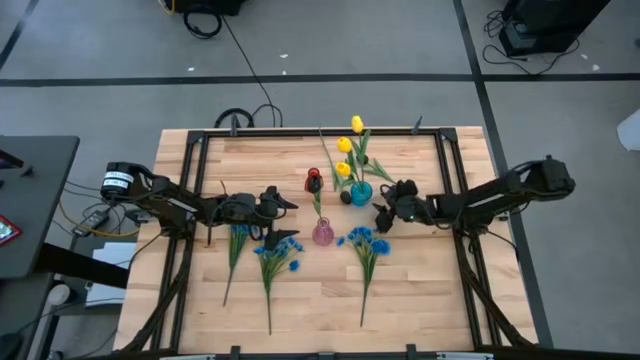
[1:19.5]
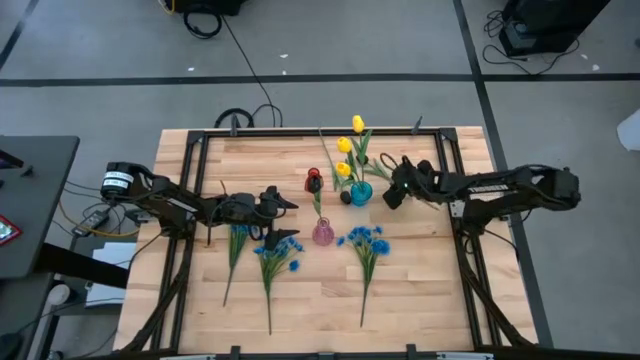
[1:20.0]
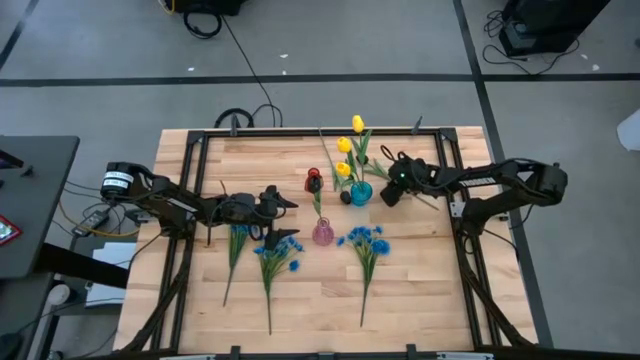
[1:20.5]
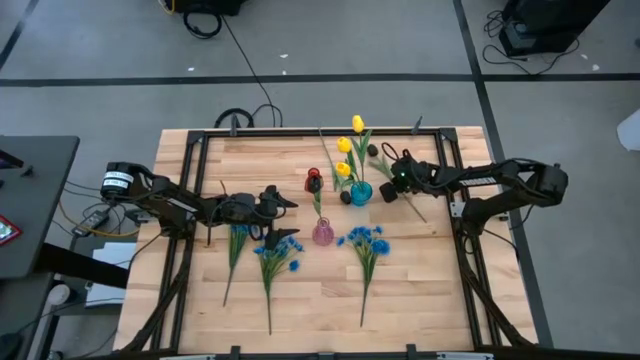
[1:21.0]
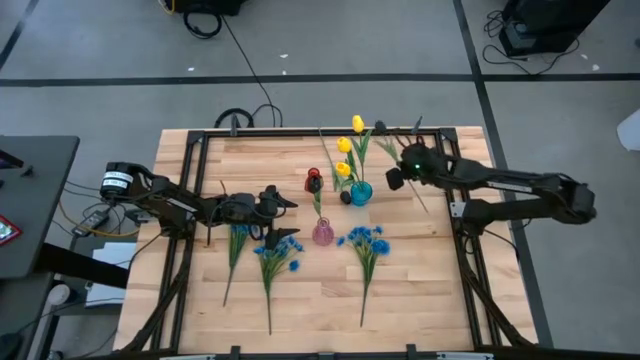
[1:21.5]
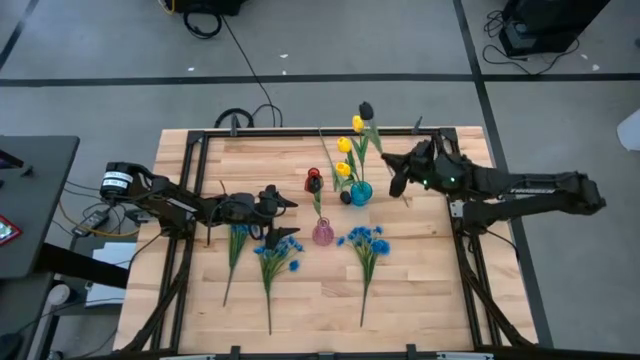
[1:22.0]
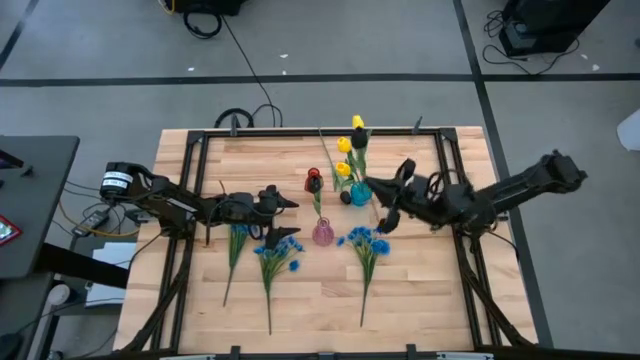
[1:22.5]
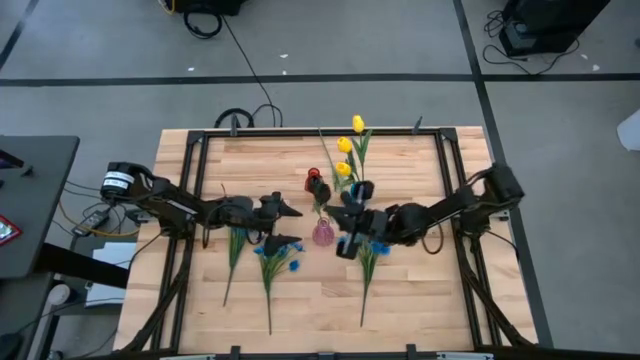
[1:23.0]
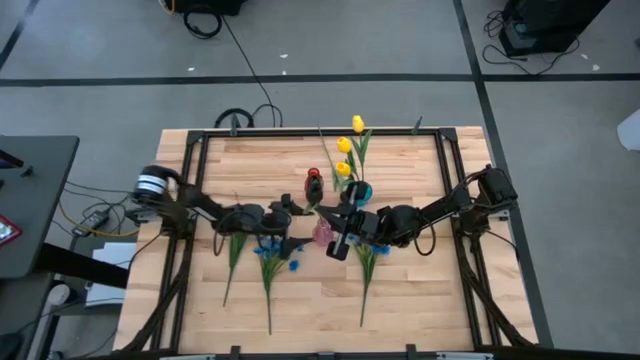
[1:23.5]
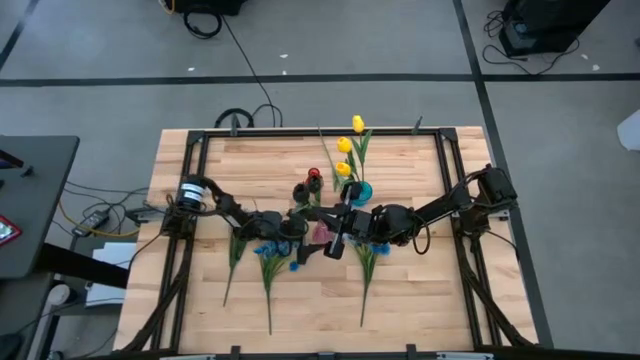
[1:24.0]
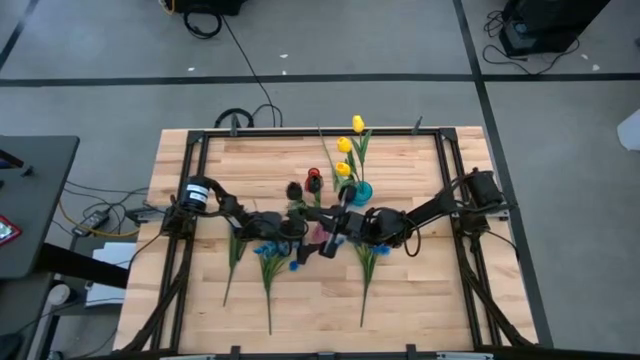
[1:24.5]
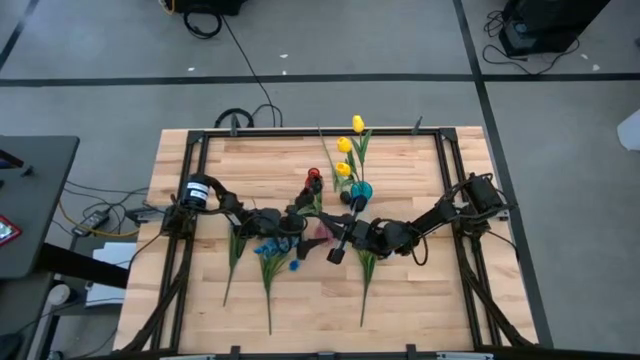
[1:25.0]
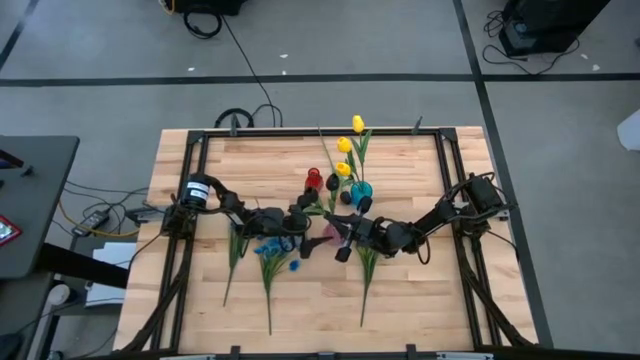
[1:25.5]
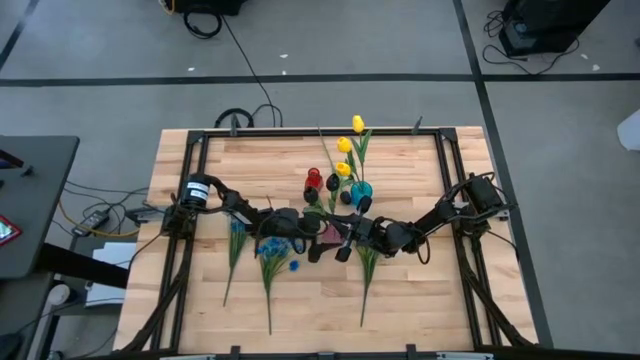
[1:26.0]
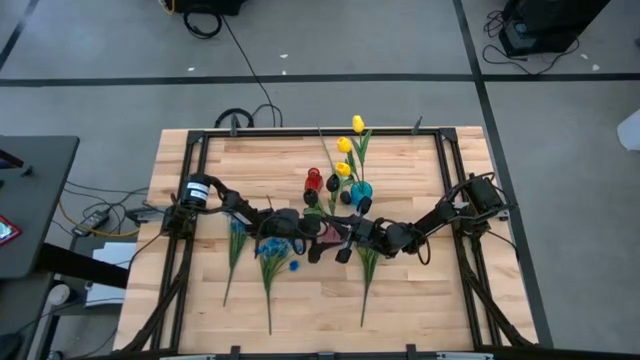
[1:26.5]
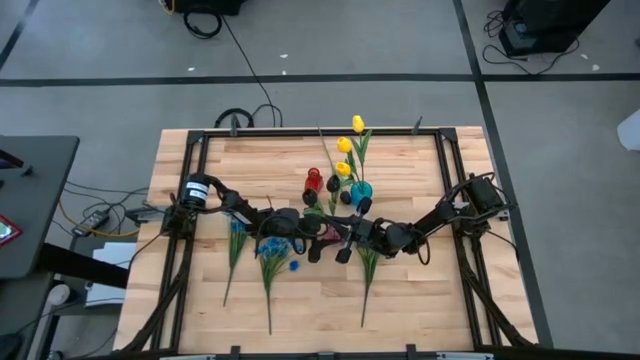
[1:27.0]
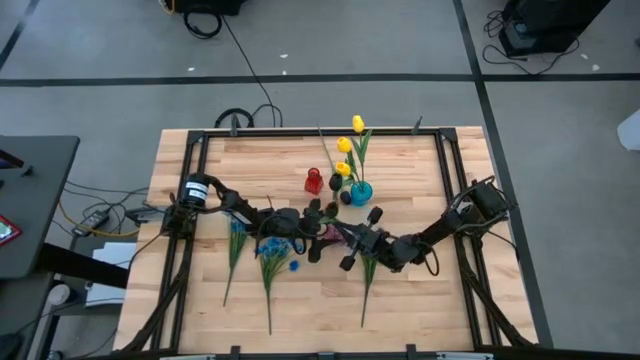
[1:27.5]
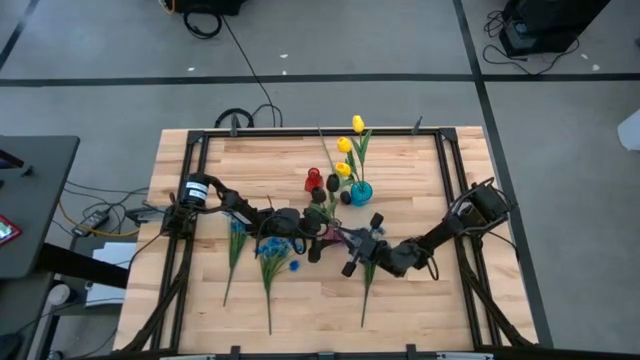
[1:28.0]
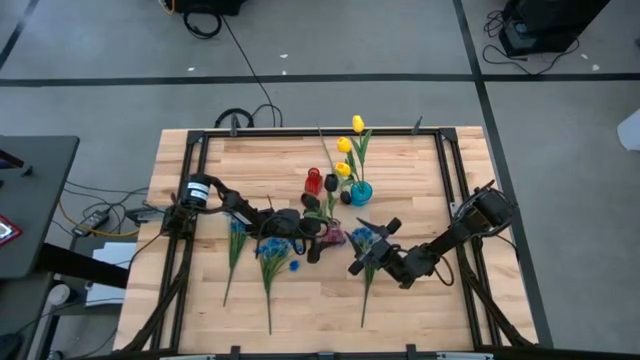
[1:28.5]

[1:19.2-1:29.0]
Task: Sort flowers into vase by color
Put the right black flower into the pink vase

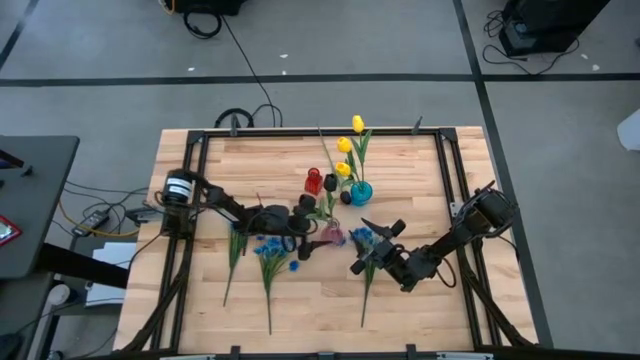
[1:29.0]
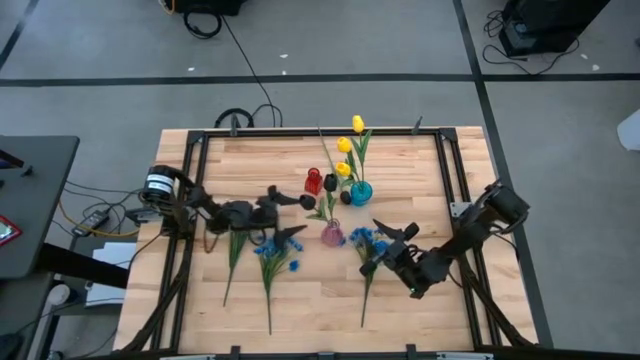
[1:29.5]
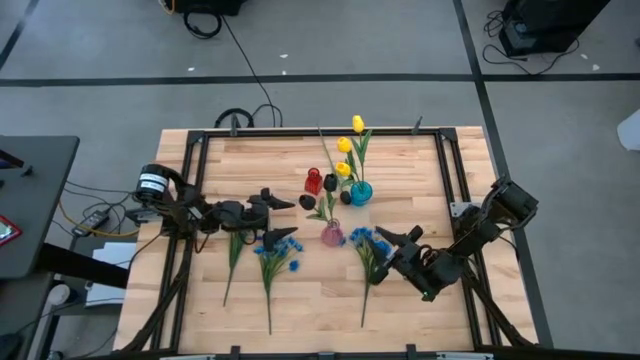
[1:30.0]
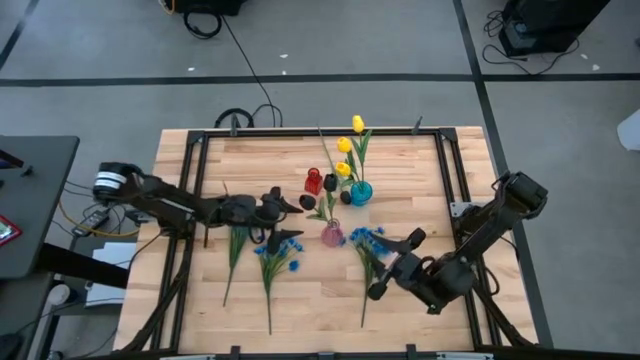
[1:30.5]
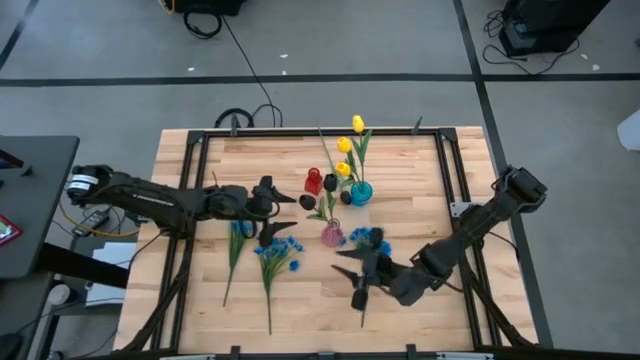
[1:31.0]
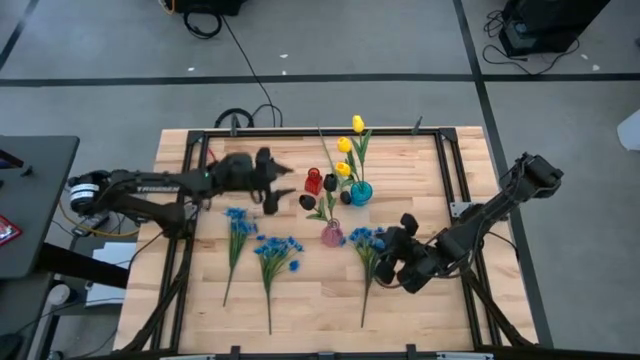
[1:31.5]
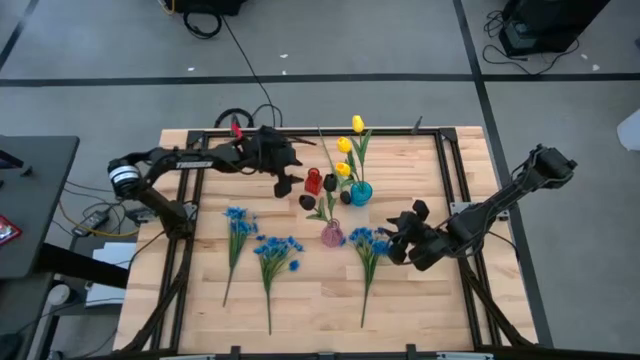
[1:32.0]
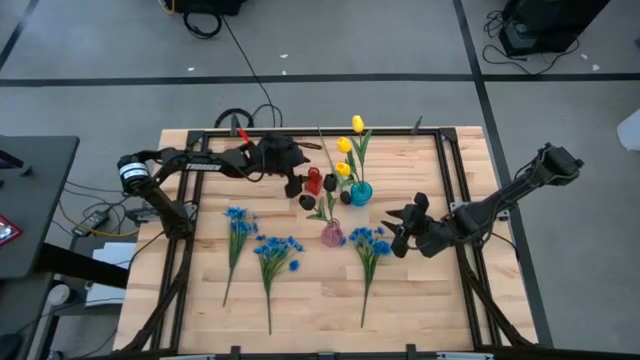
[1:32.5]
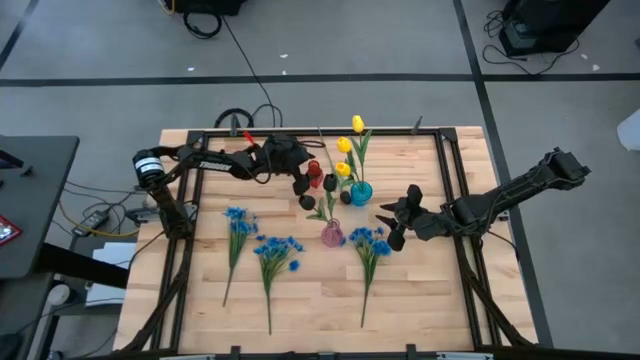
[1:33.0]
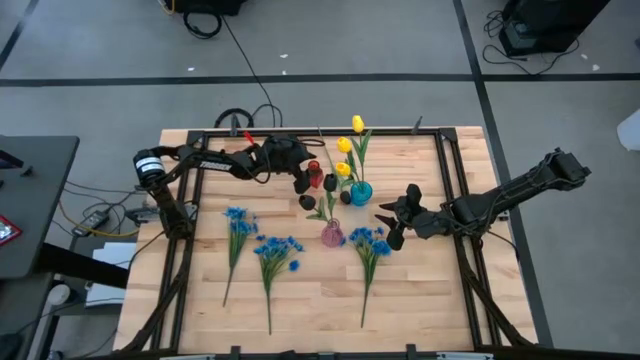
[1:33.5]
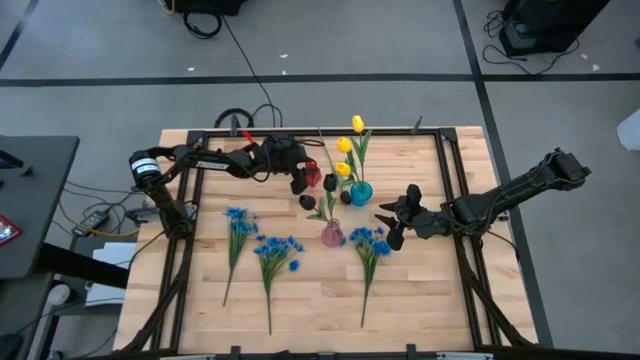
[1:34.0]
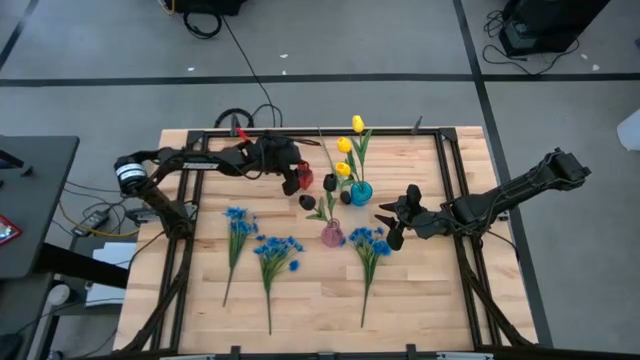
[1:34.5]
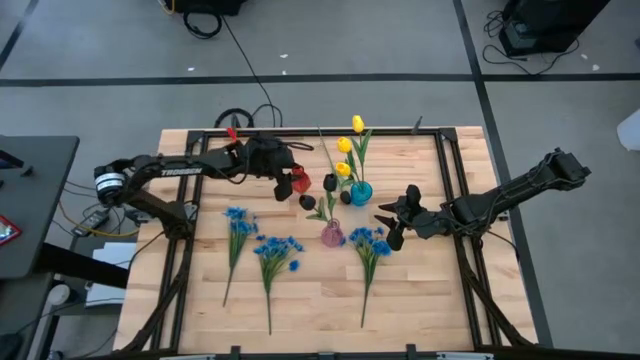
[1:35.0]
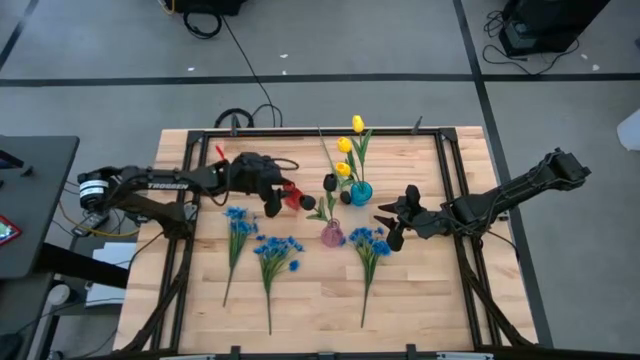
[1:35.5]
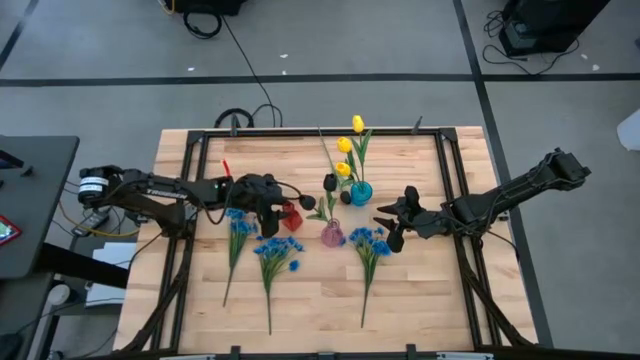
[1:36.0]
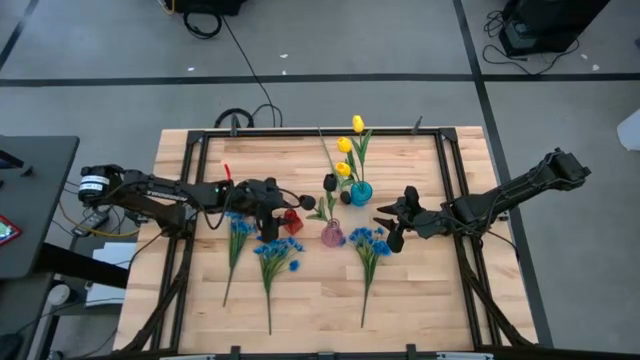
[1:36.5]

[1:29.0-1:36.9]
Move the red vase to the center of the table
